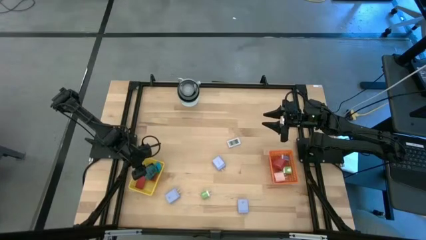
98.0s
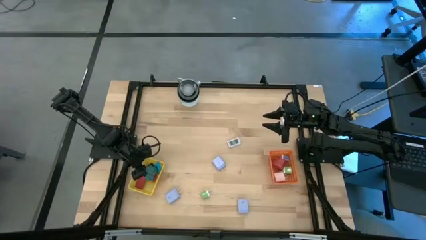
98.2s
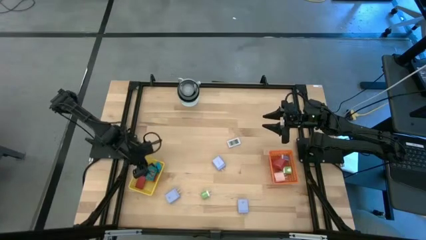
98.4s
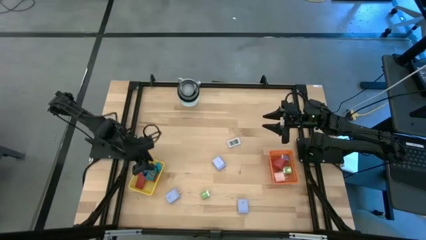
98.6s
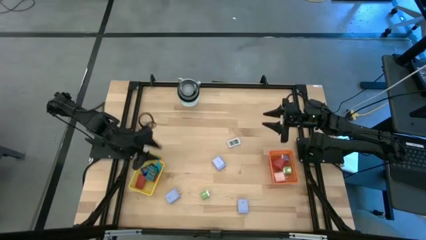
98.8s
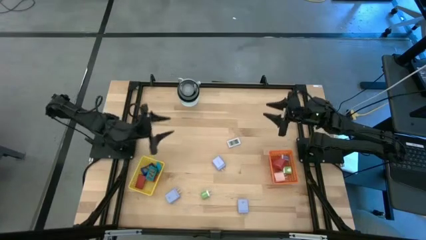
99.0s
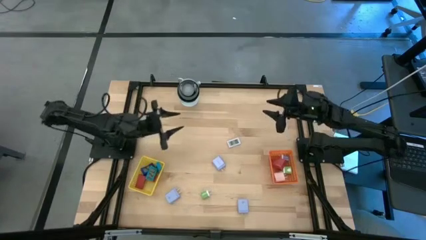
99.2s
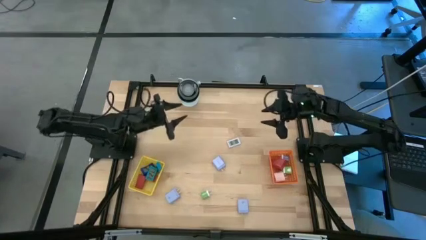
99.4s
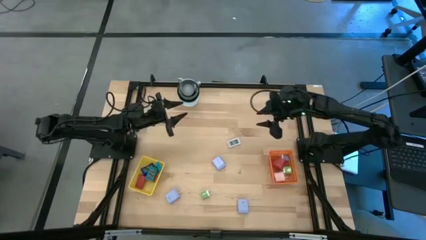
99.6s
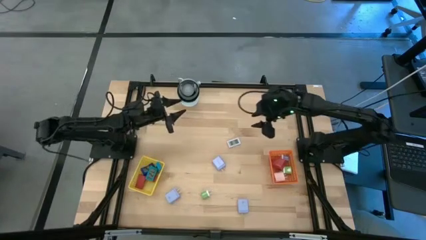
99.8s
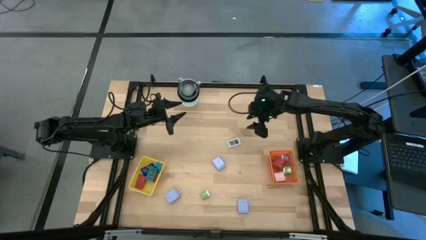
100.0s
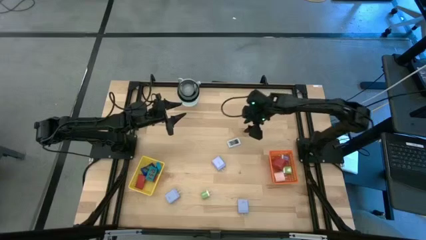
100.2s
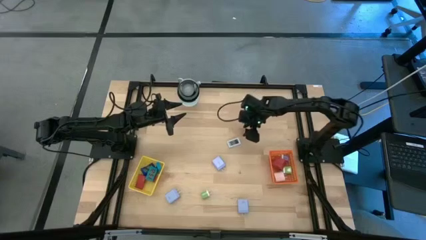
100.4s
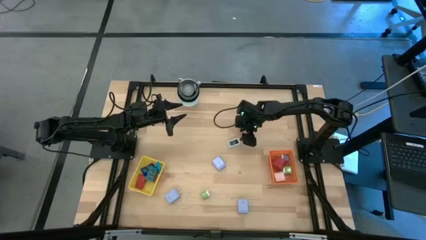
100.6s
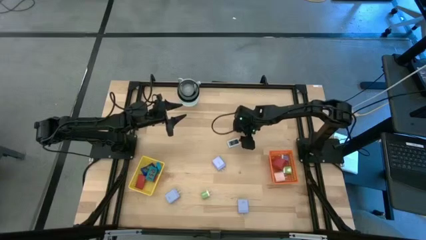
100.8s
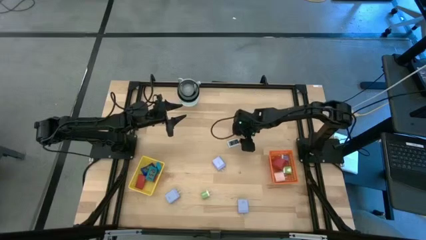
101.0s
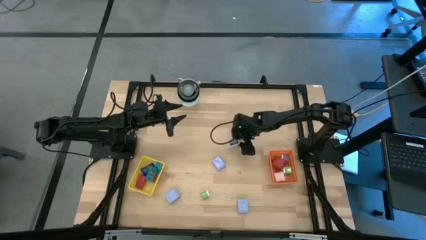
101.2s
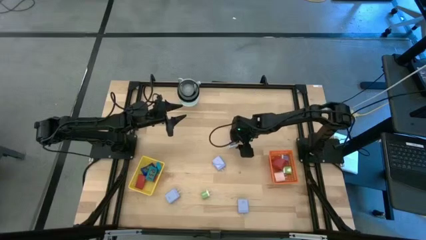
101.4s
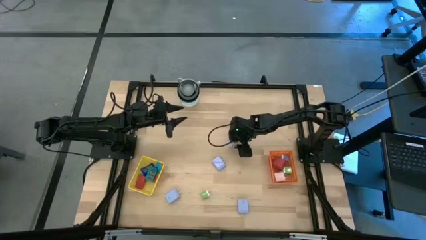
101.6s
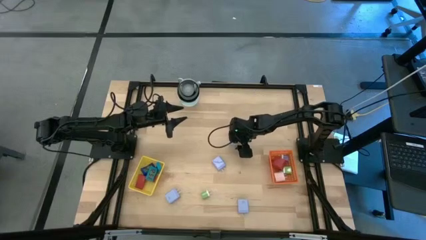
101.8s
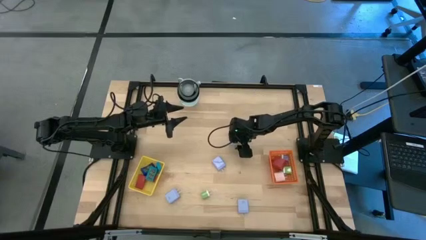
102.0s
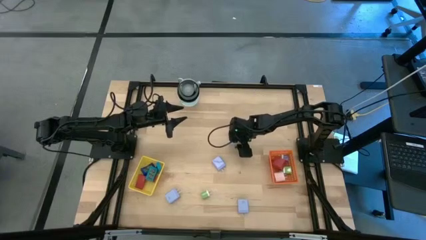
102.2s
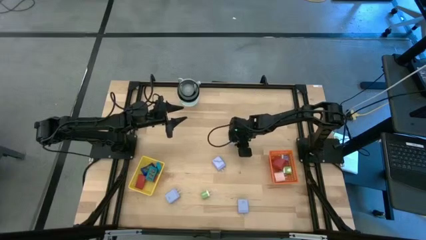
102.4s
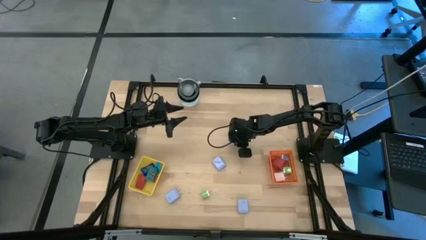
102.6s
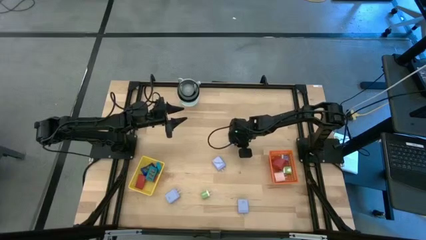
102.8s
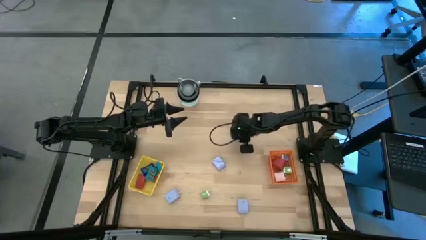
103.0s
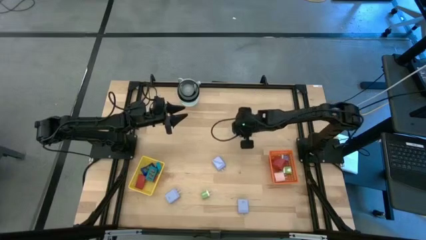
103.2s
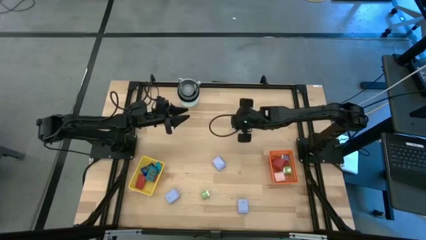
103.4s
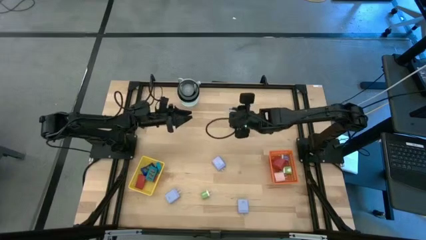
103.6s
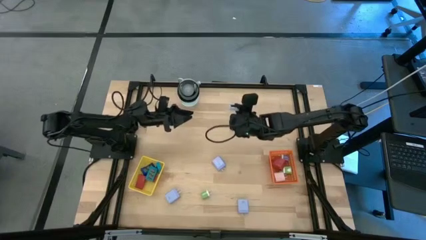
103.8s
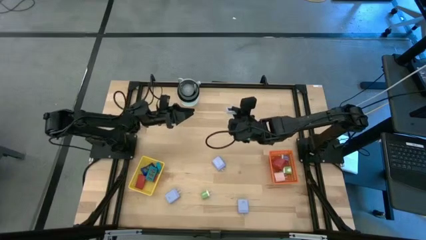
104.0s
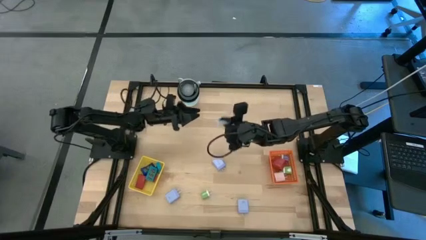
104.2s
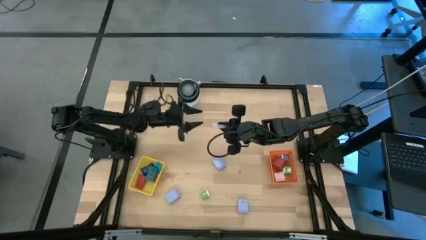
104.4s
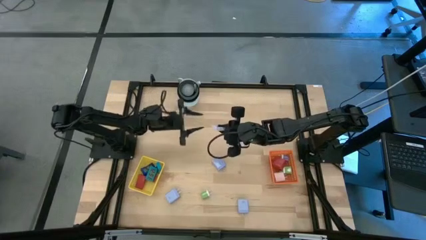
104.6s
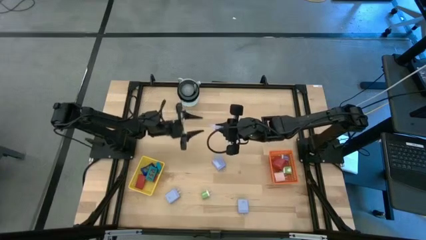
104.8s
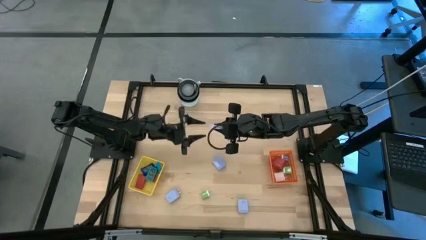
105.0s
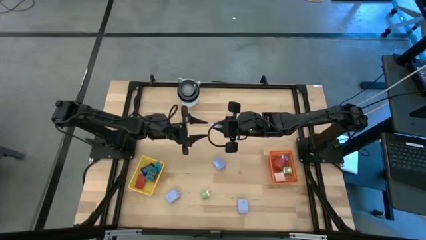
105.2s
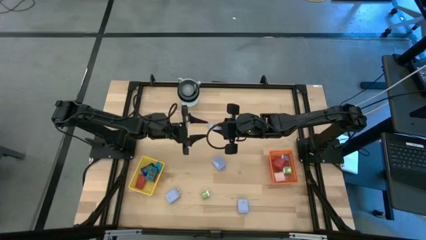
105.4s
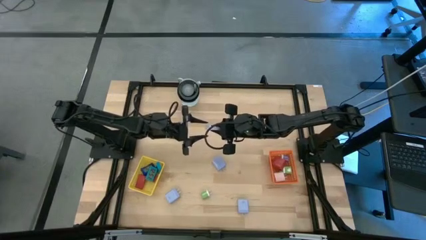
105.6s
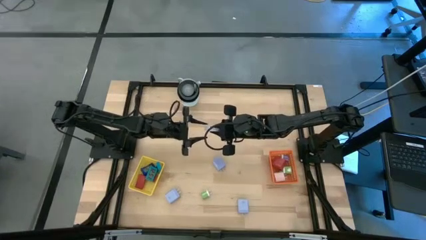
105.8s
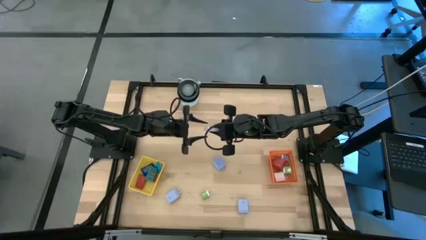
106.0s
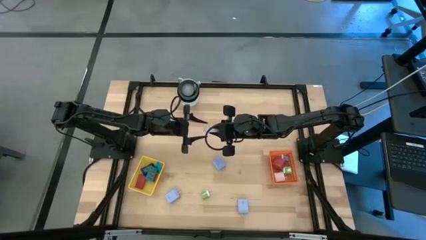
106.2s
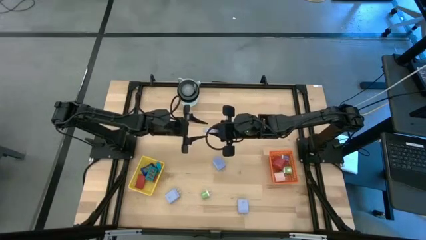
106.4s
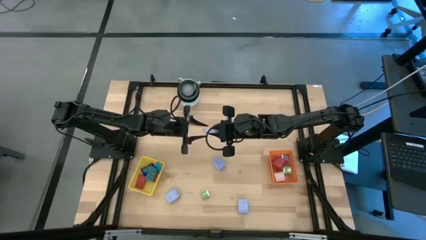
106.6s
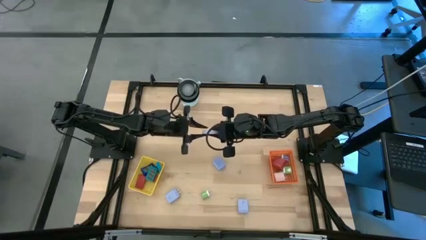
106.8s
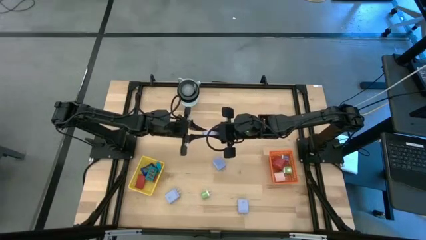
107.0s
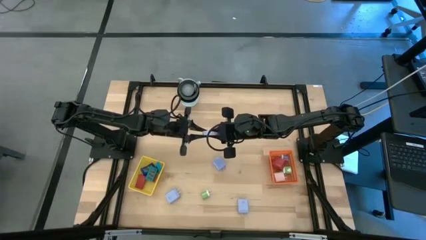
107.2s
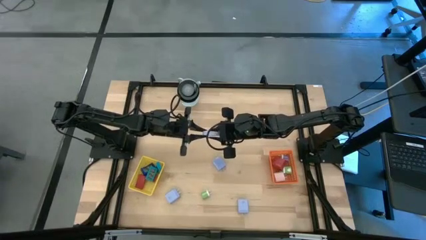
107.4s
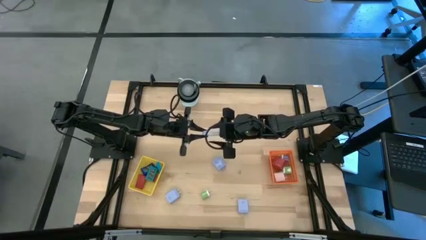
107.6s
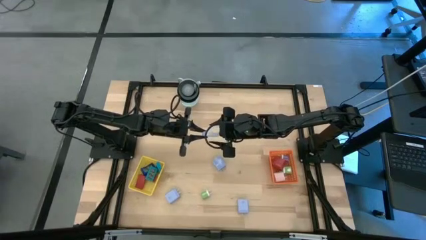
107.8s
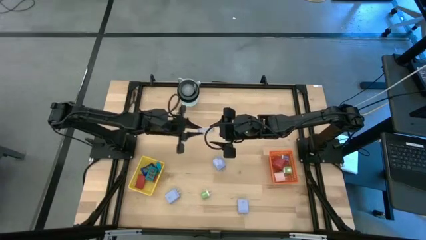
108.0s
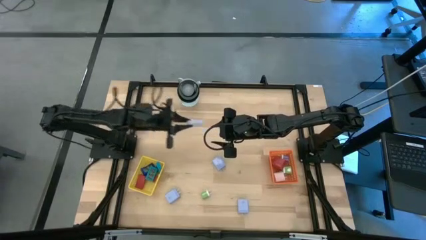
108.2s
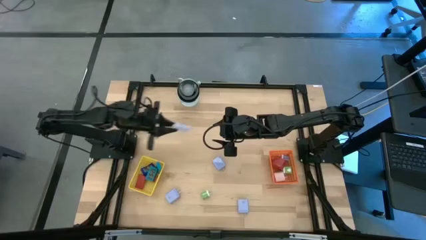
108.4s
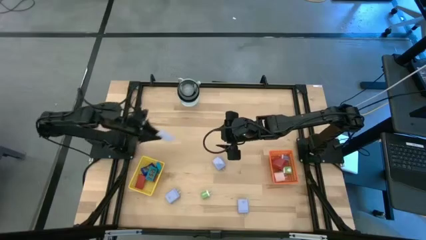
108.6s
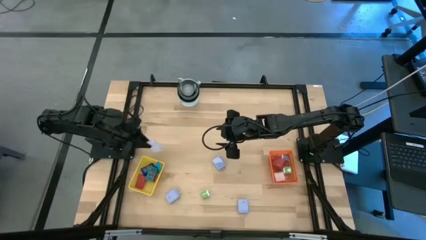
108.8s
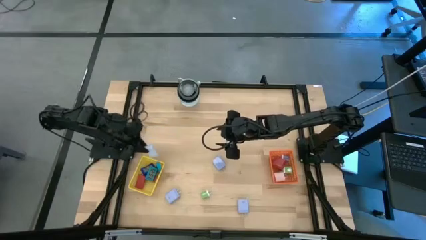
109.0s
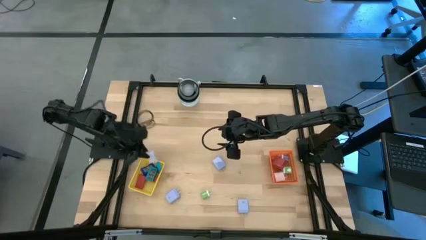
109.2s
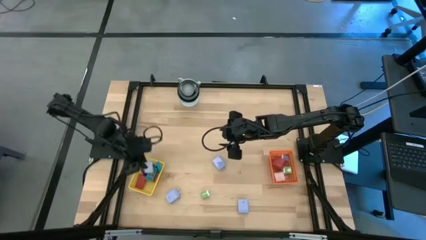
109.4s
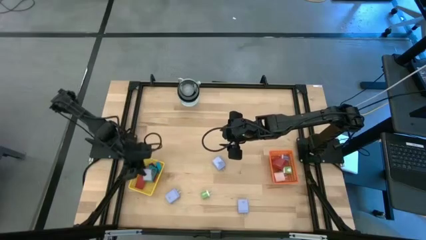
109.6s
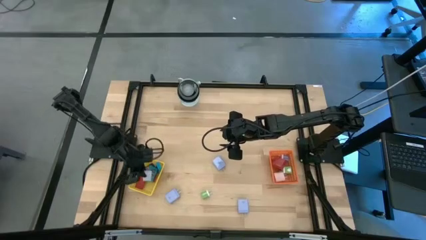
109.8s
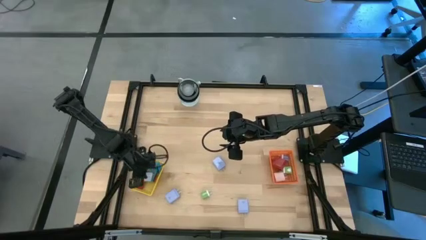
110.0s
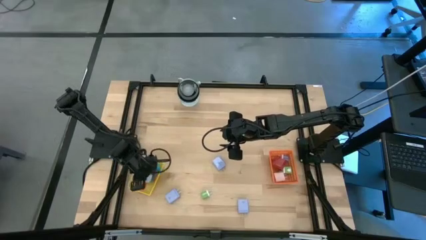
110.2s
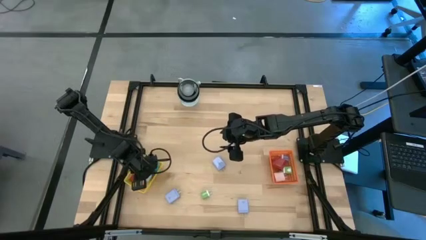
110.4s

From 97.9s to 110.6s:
Task: Pick & Place Office items
Put the white digital timer into the yellow basket

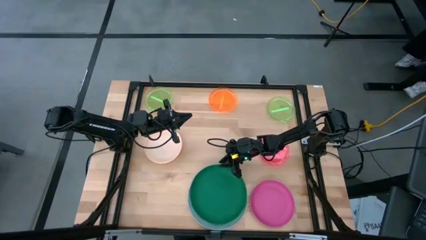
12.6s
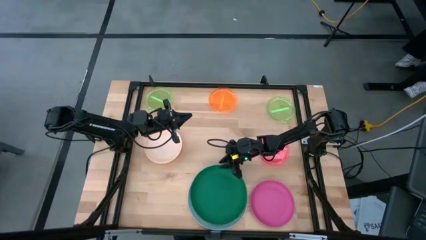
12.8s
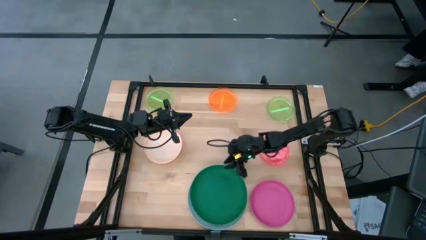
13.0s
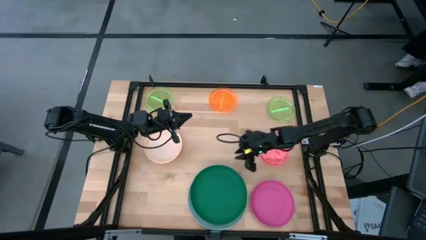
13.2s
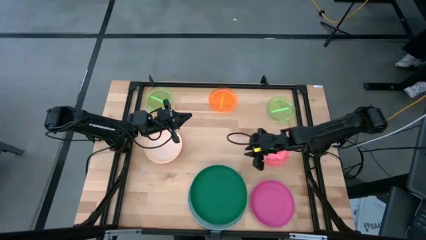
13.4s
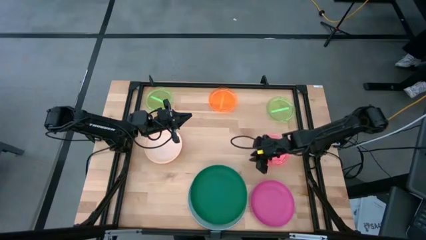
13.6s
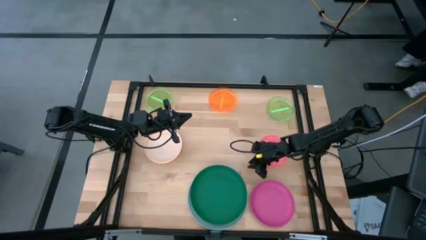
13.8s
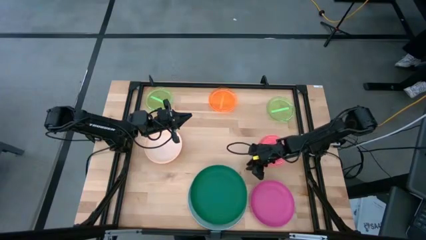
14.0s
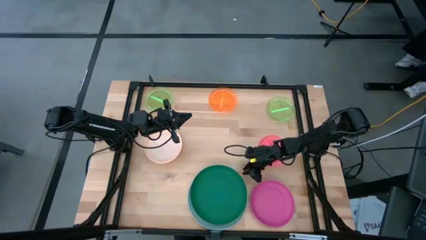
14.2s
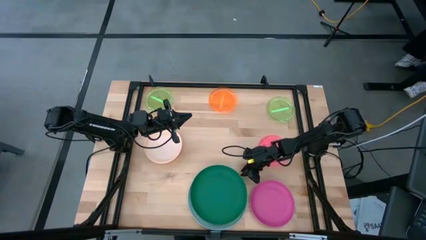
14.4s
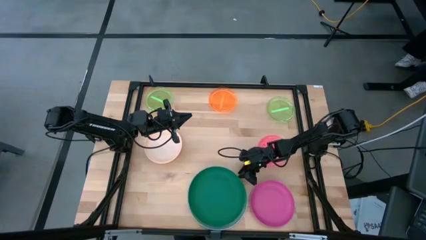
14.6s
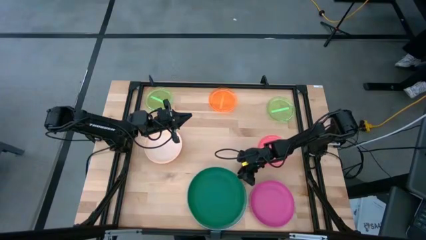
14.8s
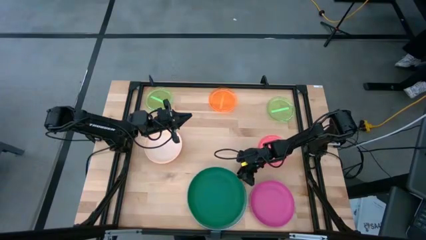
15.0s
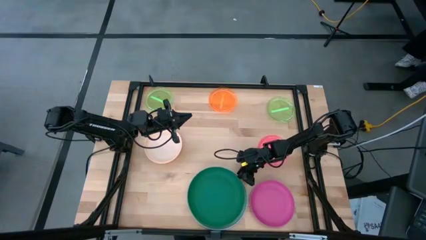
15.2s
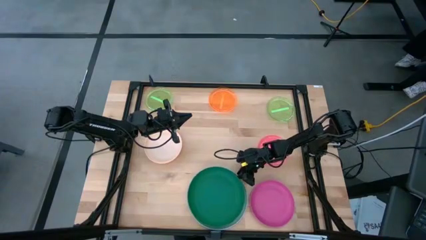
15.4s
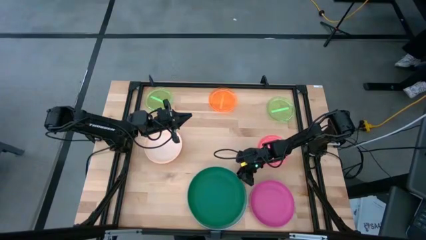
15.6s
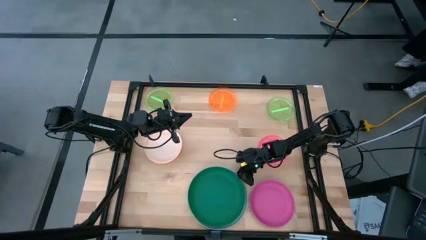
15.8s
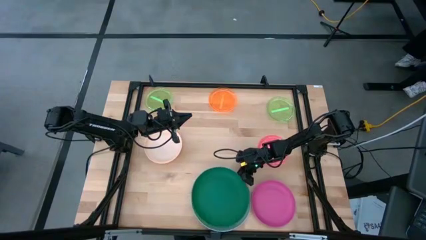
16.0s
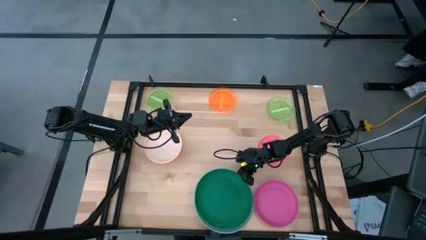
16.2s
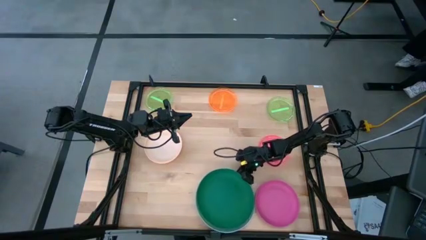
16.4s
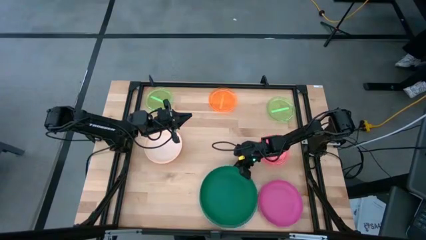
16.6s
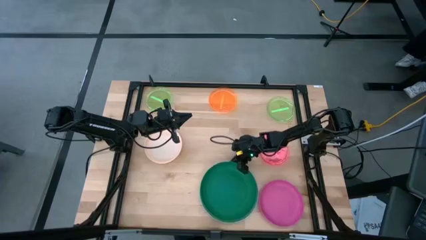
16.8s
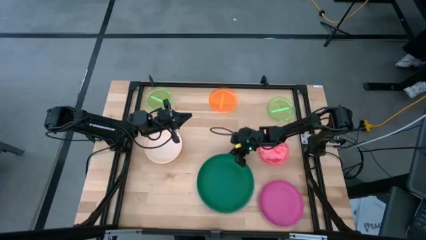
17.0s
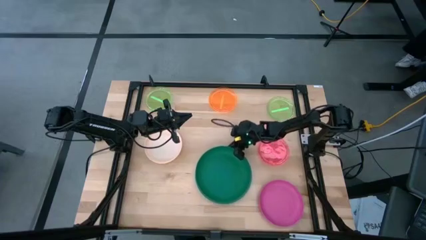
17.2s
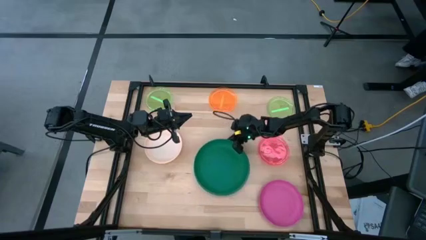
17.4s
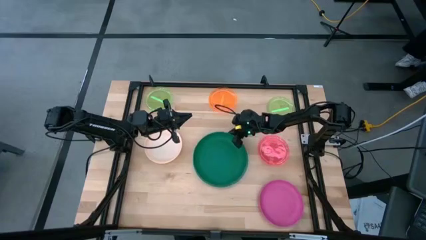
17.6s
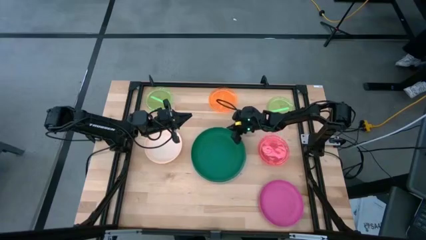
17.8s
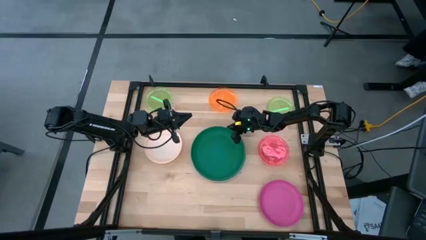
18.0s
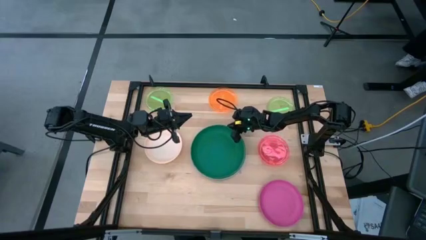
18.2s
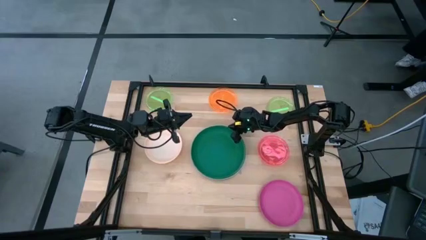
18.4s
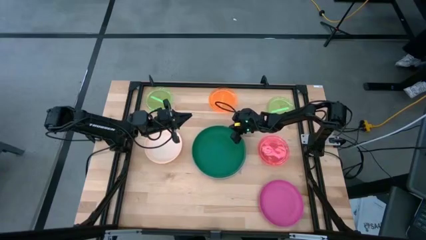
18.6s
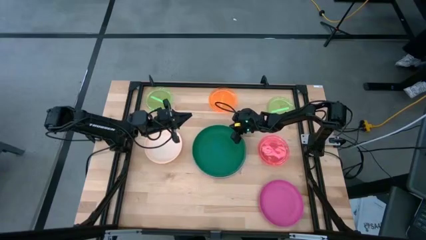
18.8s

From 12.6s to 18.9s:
Task: Stack plastic plates
Move the stack of plates to the center of the table
